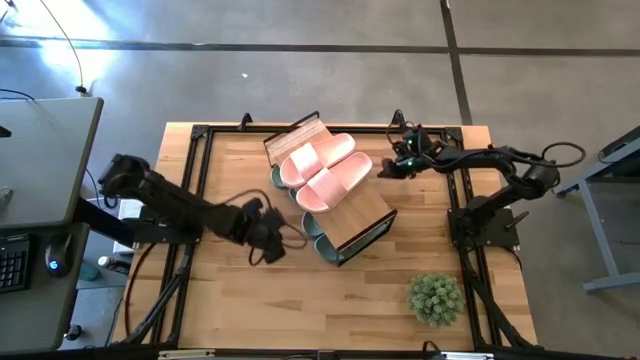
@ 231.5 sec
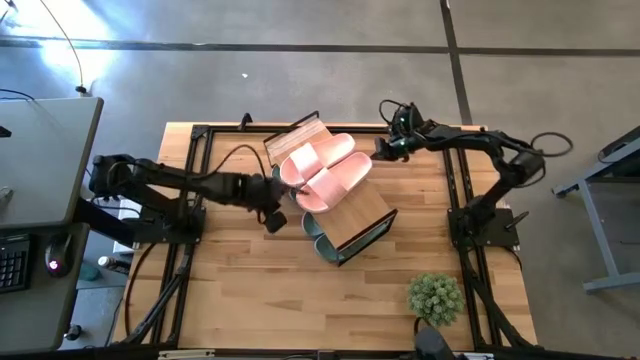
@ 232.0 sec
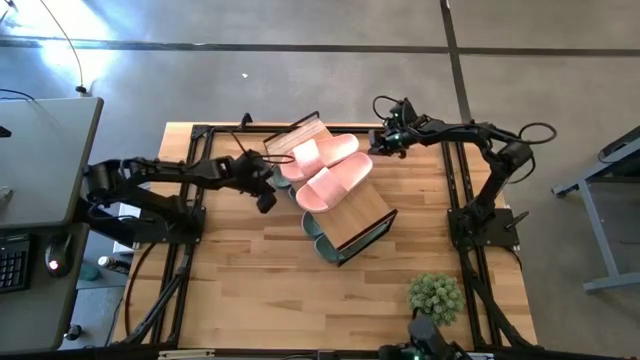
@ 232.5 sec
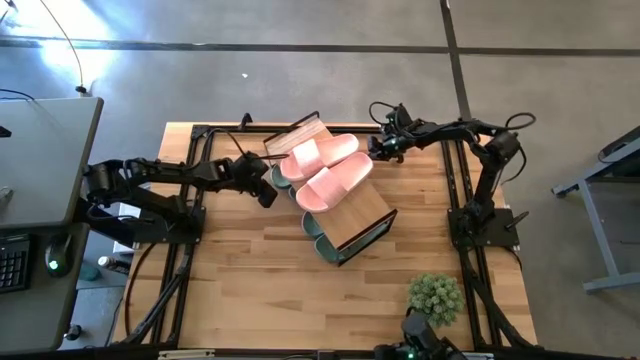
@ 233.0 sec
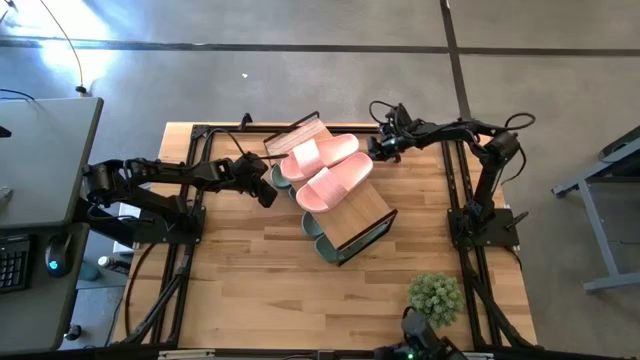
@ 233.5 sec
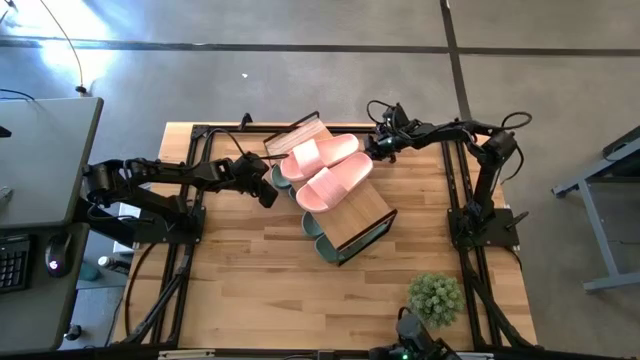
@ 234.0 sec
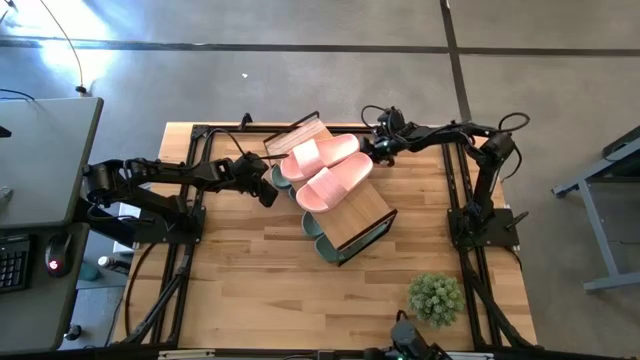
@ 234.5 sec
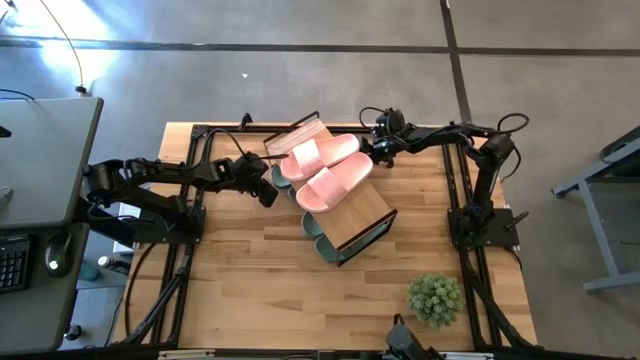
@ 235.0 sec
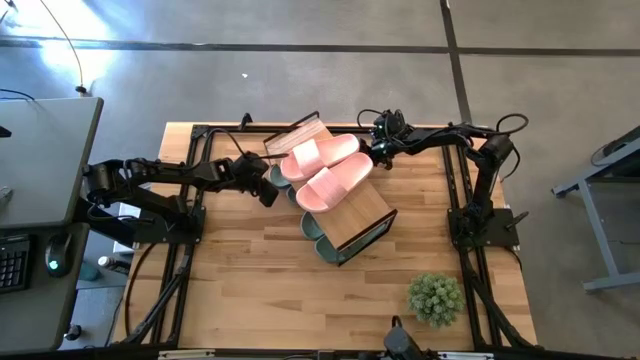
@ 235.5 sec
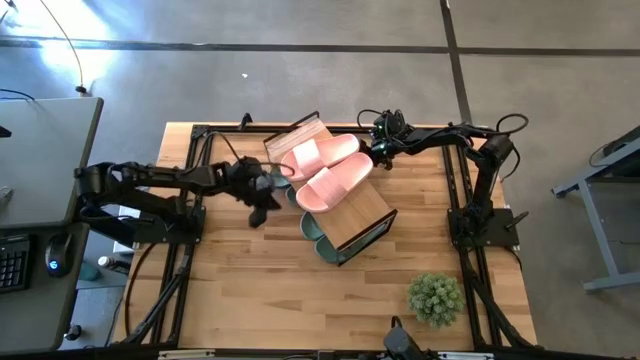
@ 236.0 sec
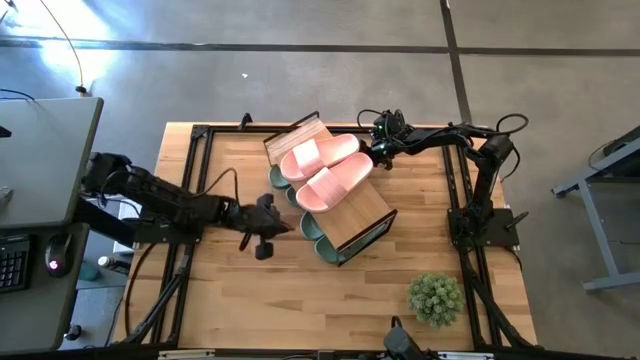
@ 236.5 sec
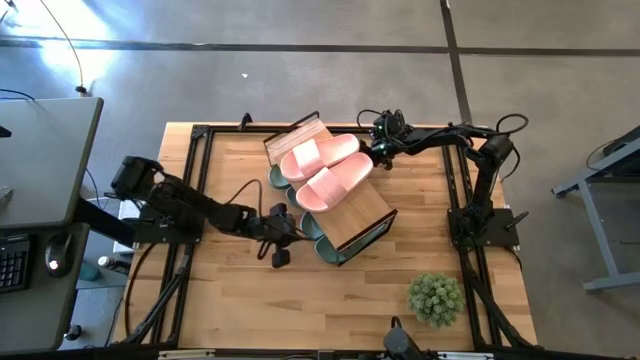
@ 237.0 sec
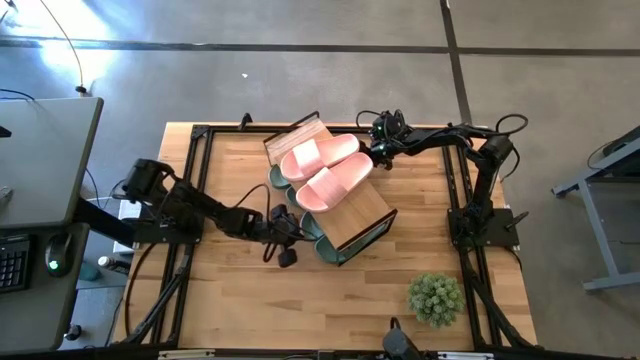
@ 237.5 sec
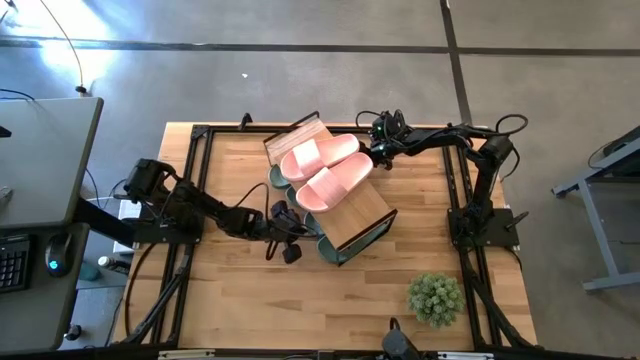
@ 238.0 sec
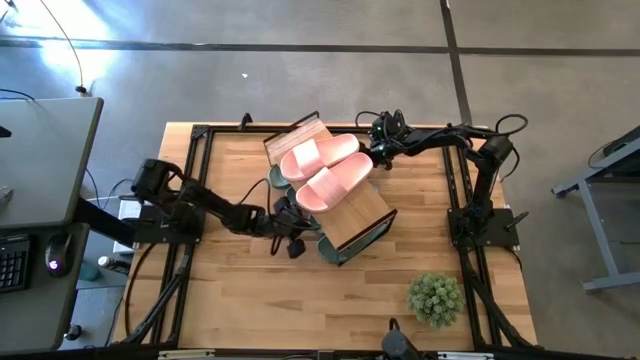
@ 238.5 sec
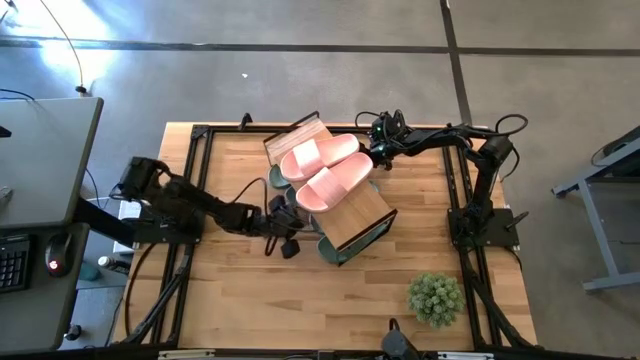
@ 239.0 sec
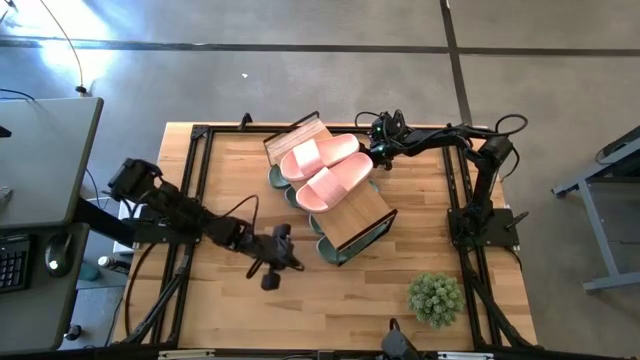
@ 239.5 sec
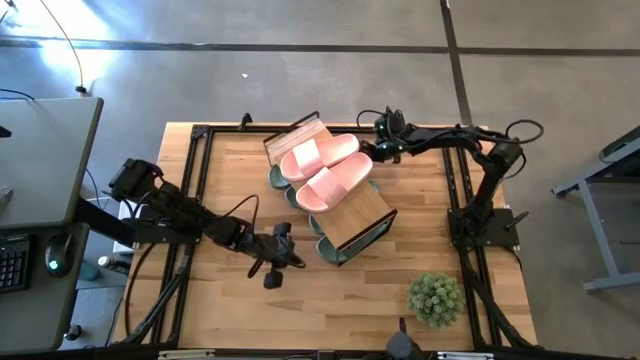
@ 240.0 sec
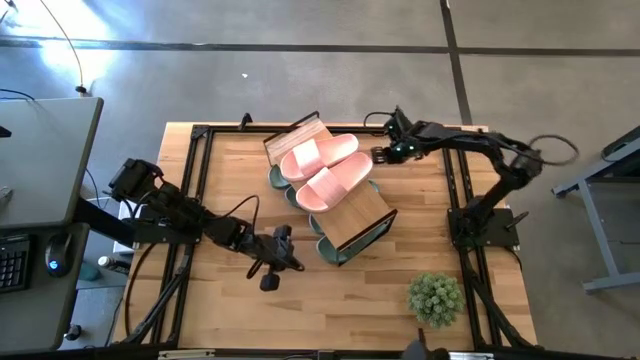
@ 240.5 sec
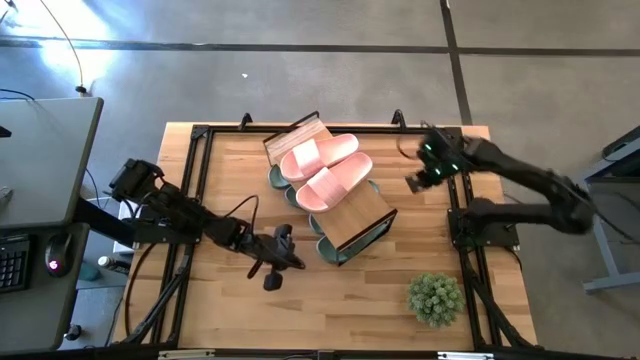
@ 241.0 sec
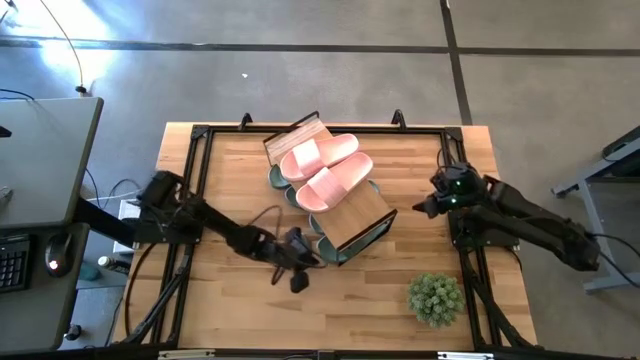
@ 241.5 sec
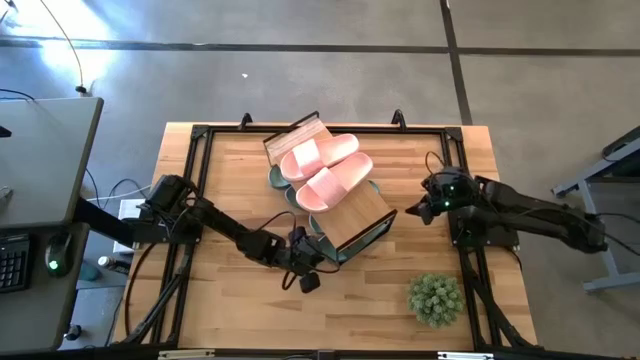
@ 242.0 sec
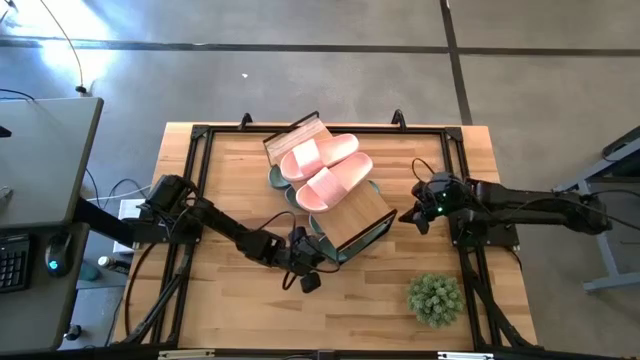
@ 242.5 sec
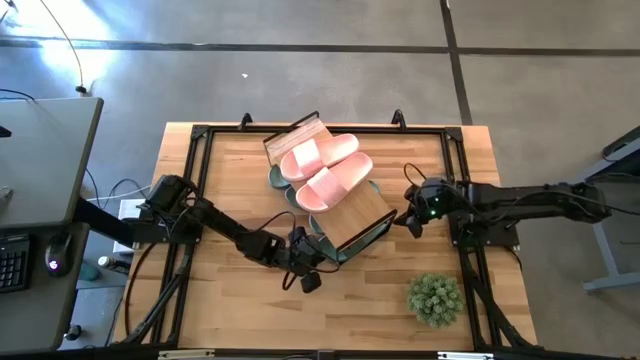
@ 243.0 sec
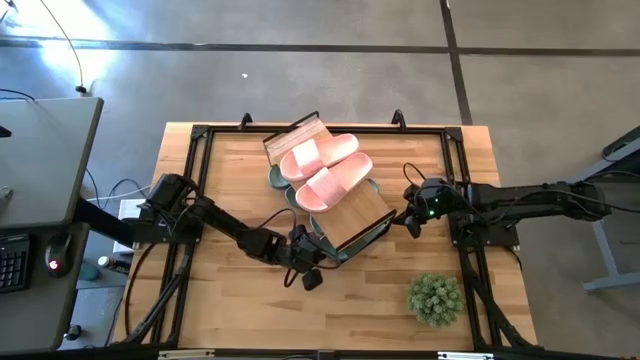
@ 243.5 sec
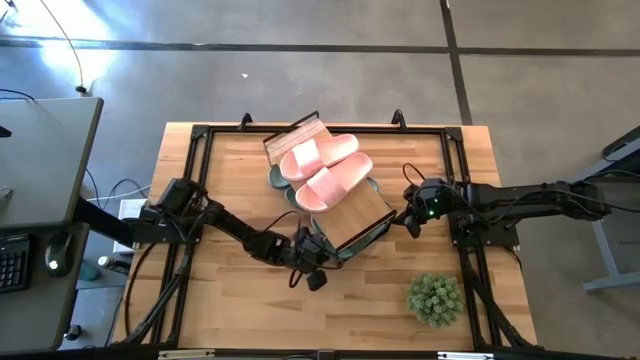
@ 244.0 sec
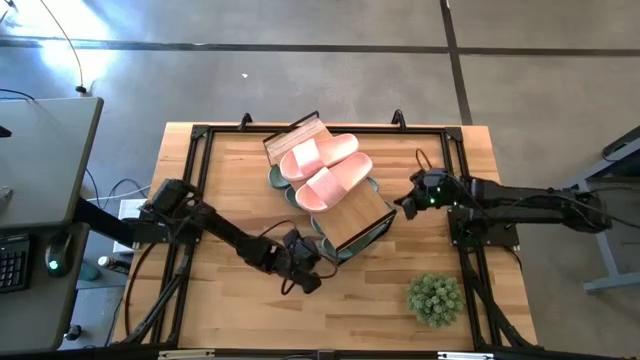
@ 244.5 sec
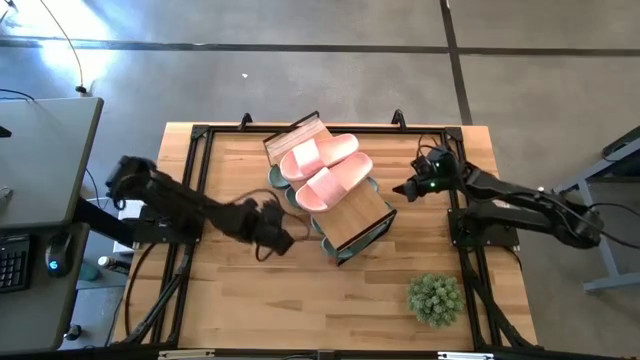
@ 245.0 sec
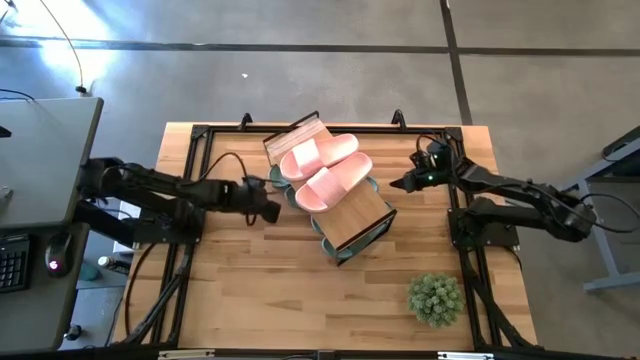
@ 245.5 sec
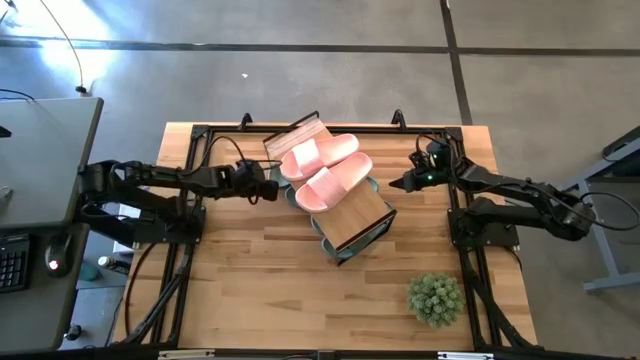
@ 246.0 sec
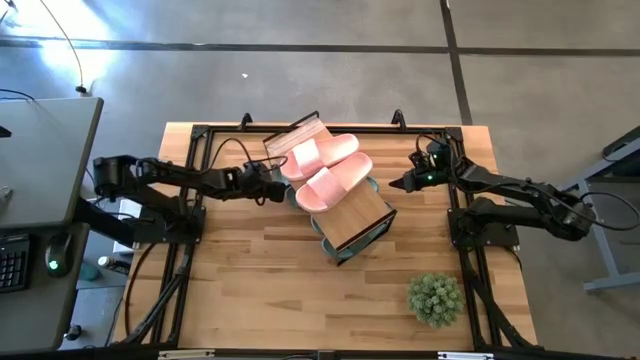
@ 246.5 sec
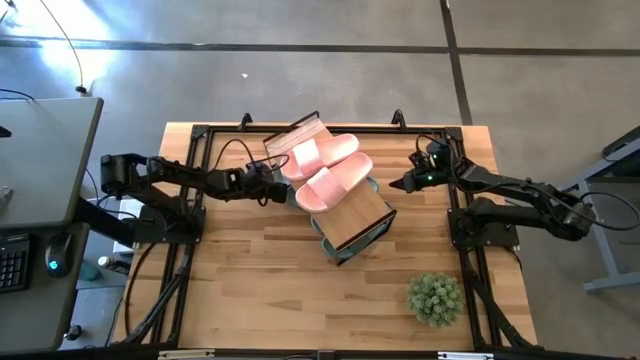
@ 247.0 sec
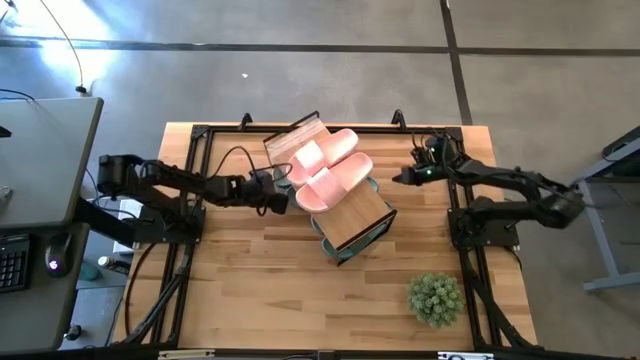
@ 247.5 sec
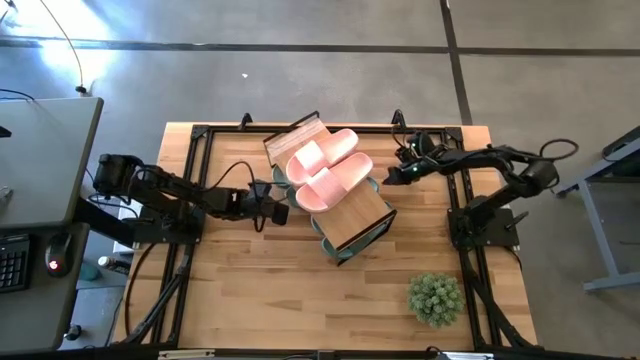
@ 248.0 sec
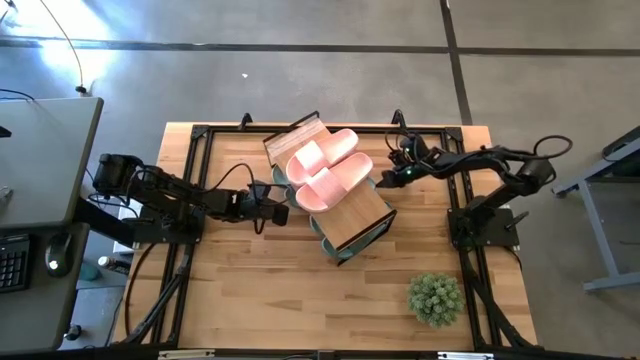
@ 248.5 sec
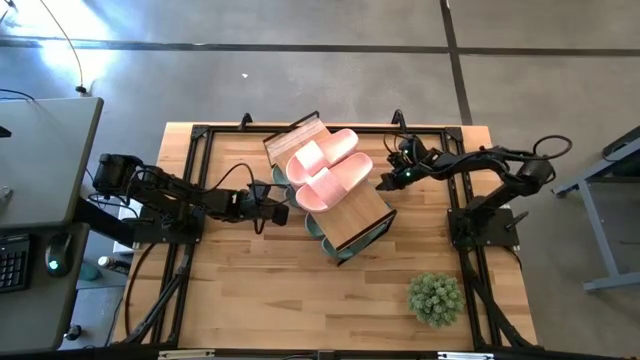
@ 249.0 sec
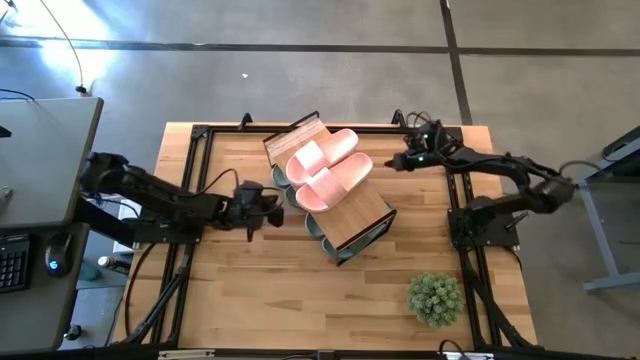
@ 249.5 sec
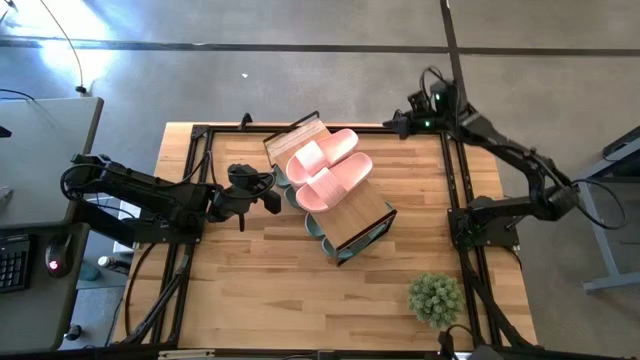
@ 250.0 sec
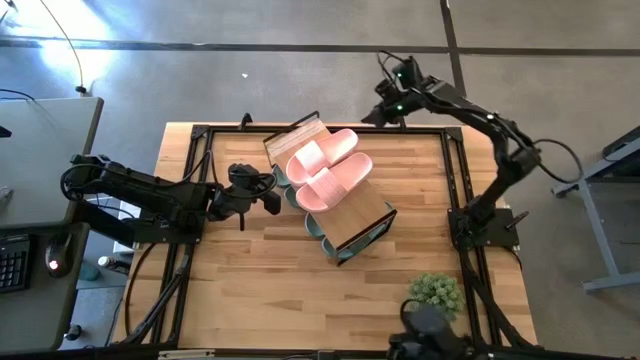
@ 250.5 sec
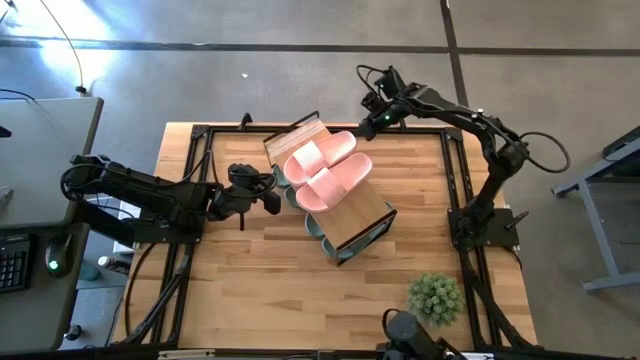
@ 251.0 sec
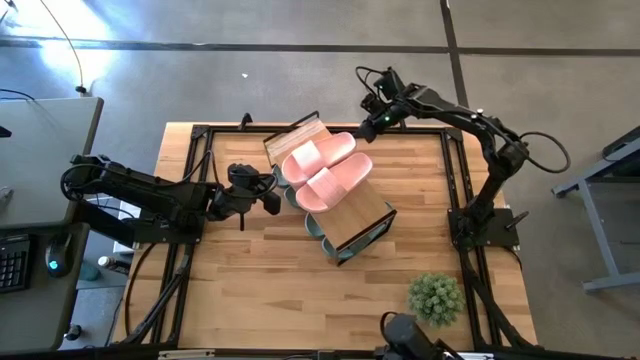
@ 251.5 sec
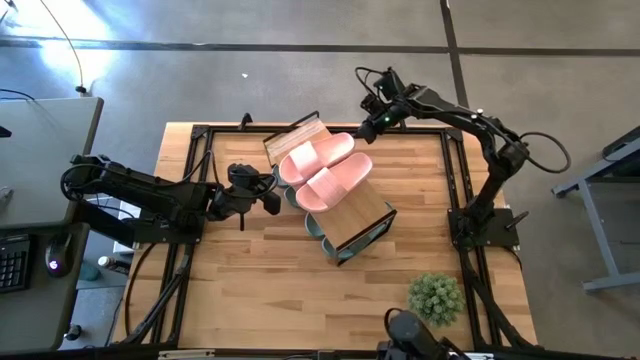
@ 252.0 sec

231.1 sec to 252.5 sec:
Task: Pick and place slides into the shelf
Adjust the slides on the shelf
